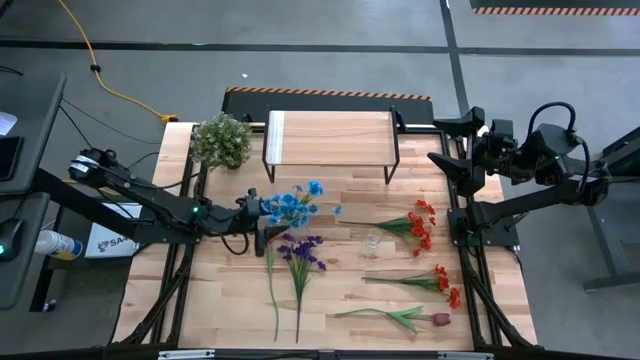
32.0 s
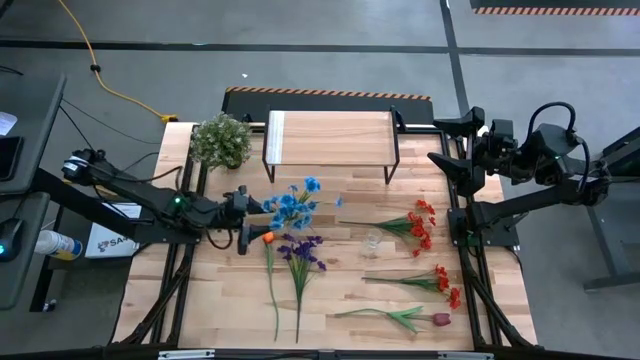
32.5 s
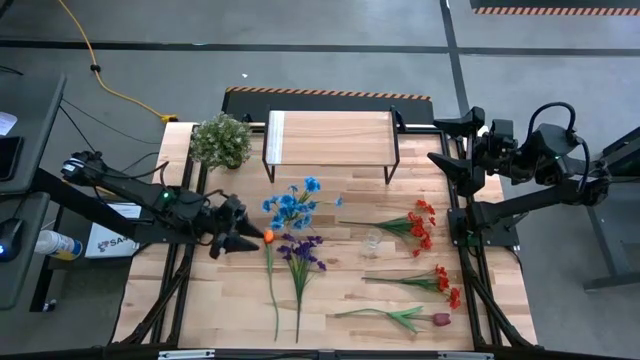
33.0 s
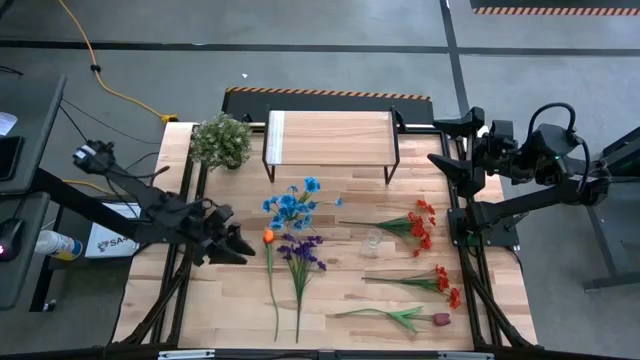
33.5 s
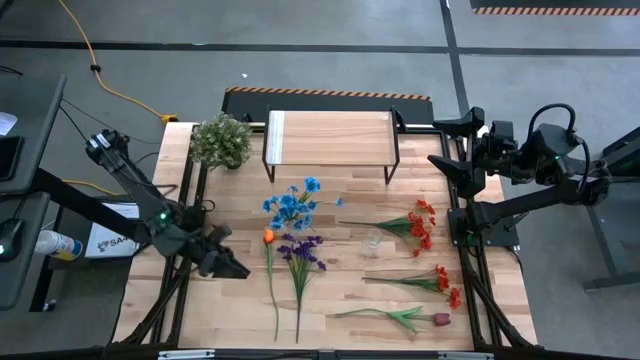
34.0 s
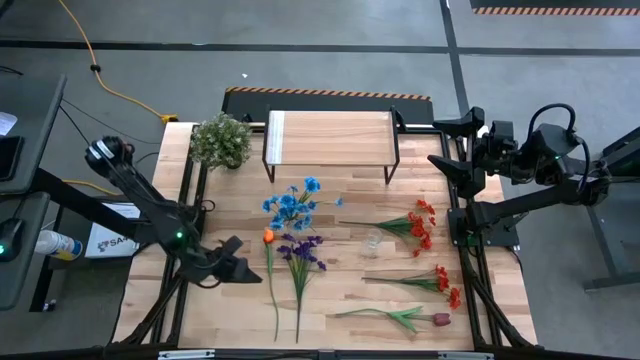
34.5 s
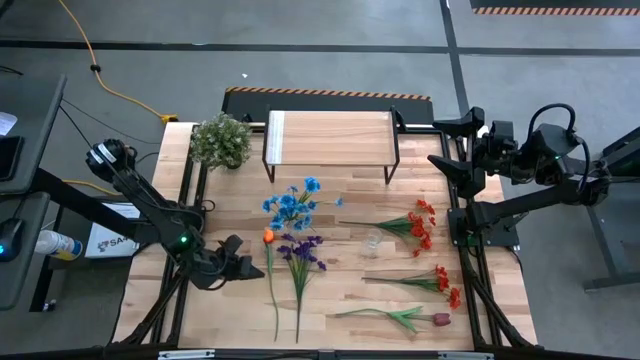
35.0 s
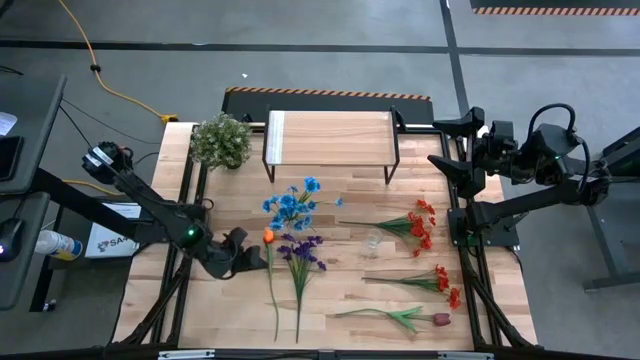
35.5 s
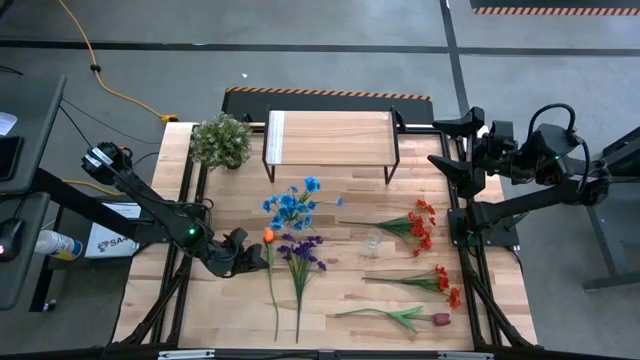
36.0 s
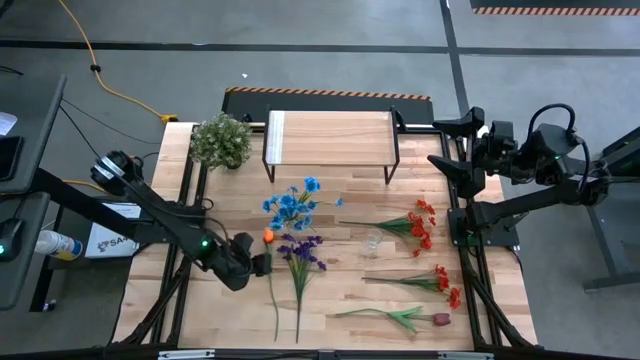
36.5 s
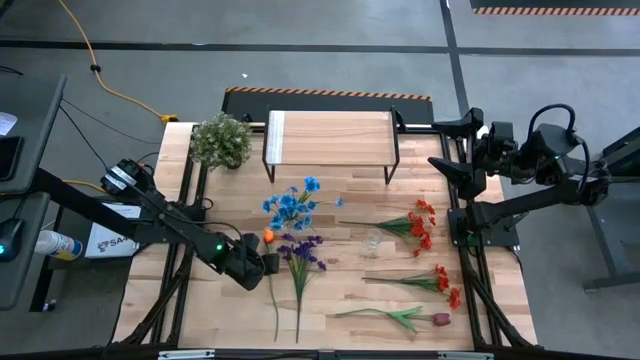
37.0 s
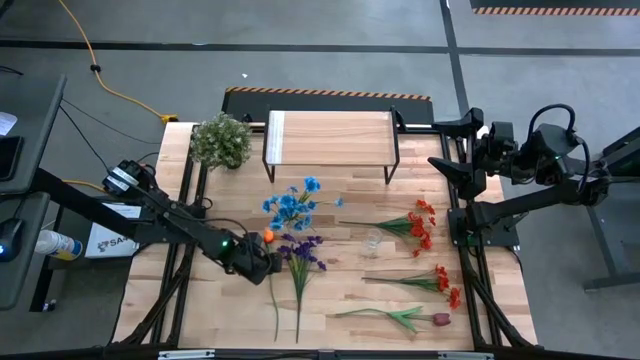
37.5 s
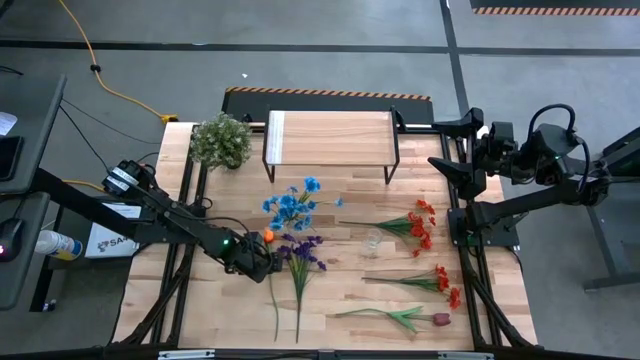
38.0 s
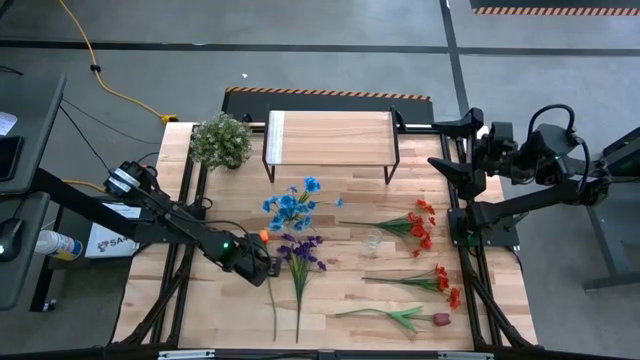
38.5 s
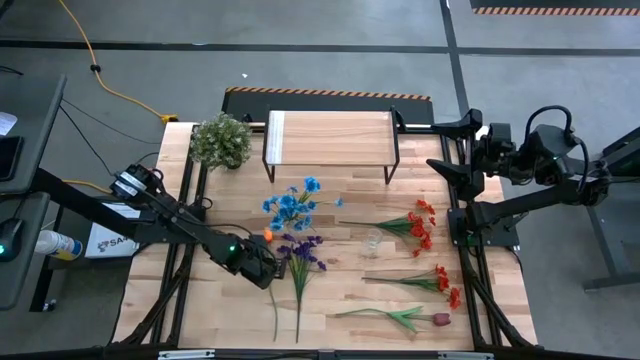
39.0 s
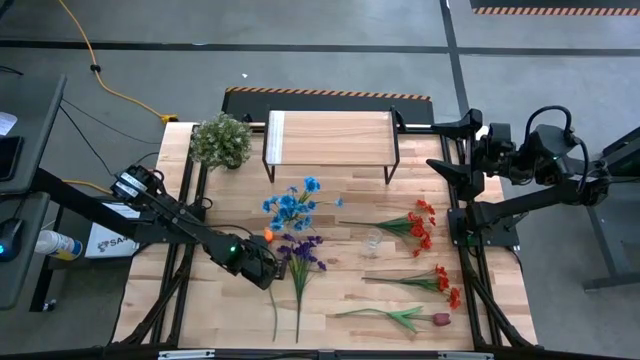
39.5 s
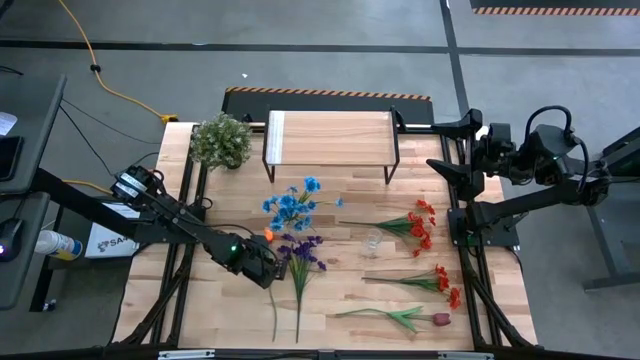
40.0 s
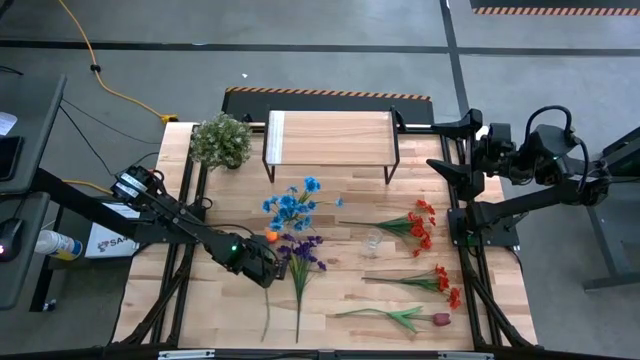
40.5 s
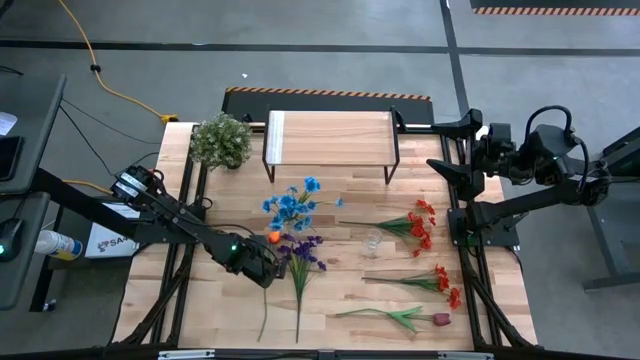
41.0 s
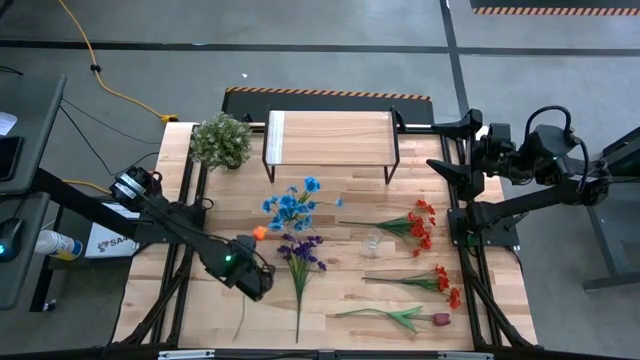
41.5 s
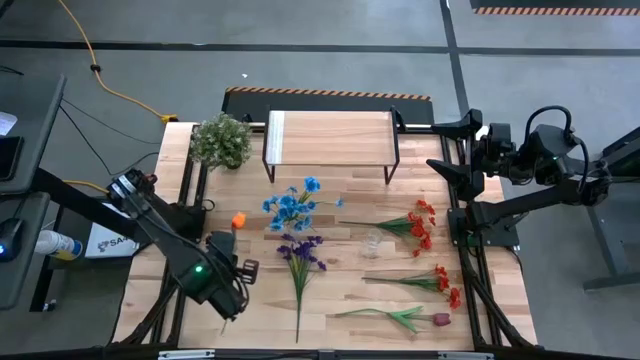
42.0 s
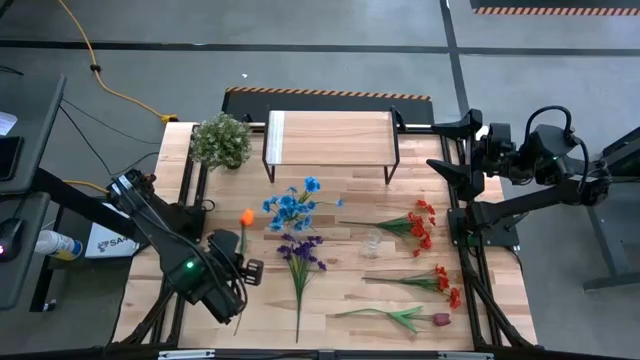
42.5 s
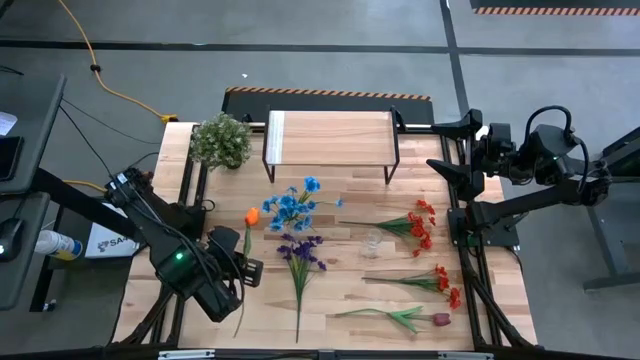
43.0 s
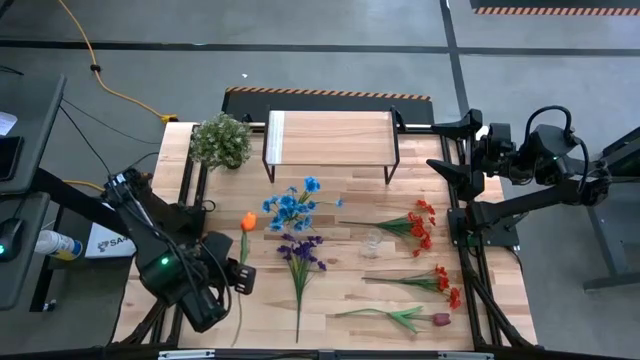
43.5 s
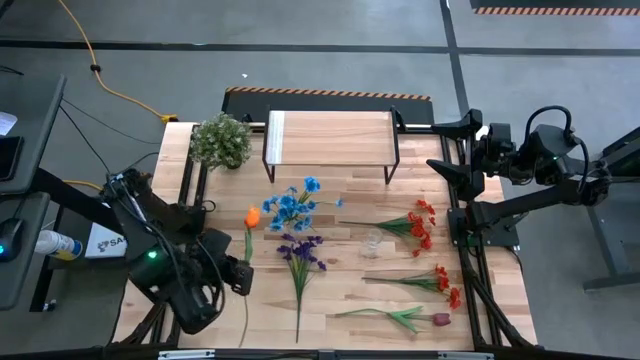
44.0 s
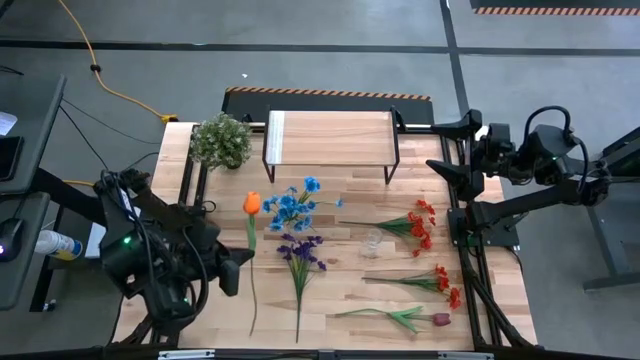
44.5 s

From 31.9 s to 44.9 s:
Task: Pick and place flowers into a vace then onto a shelf
Put the orange flower into the left transparent vase

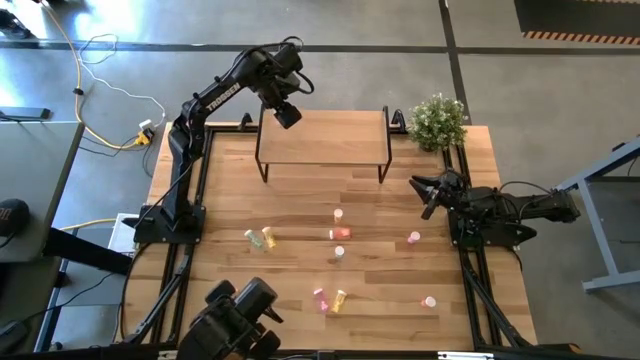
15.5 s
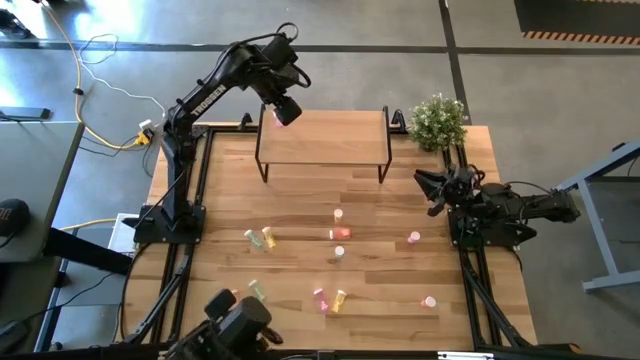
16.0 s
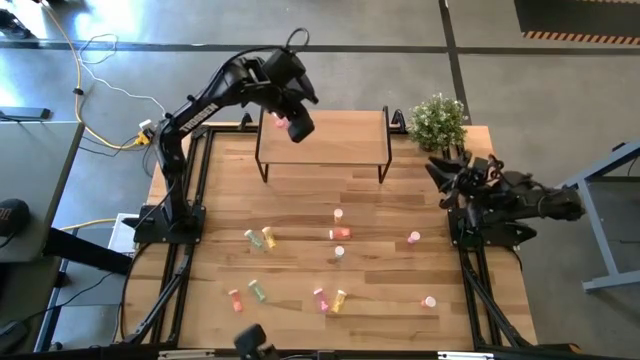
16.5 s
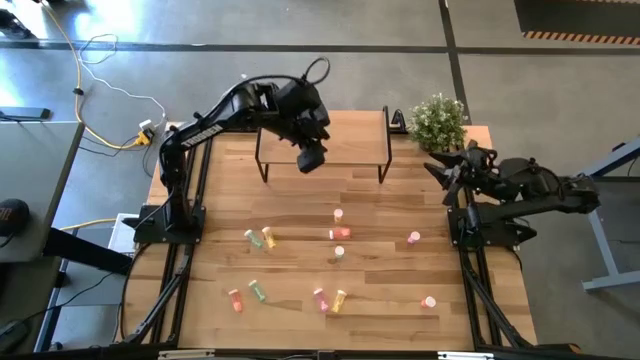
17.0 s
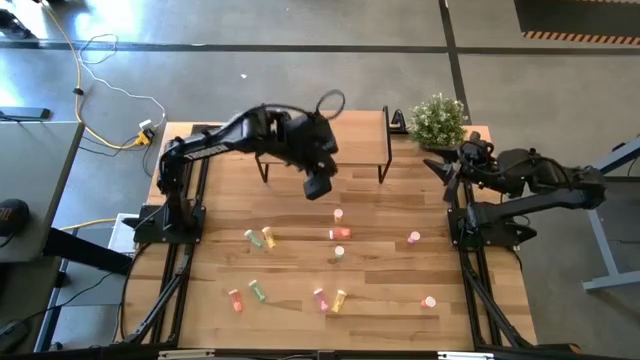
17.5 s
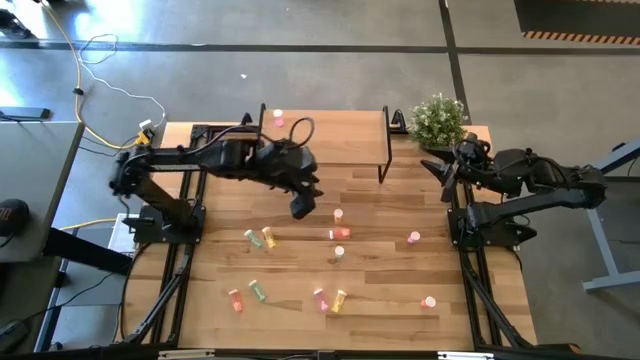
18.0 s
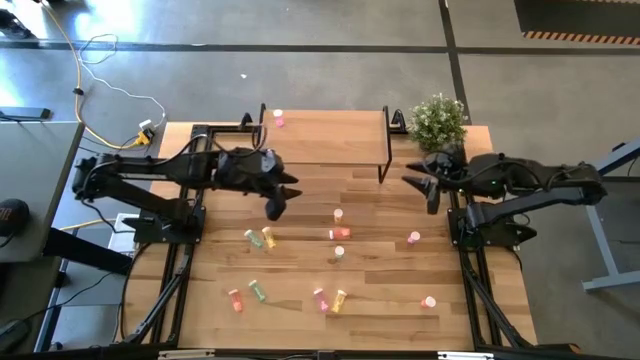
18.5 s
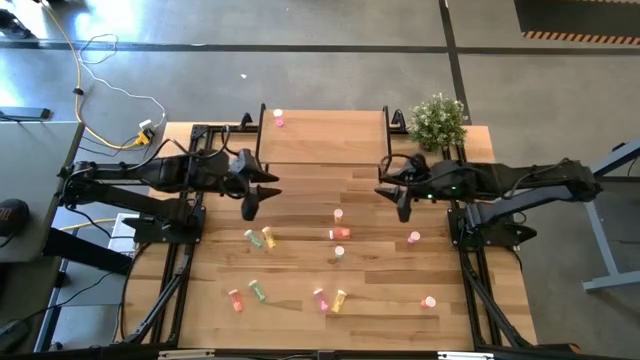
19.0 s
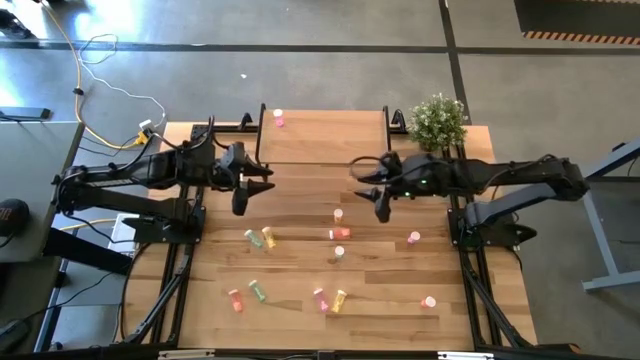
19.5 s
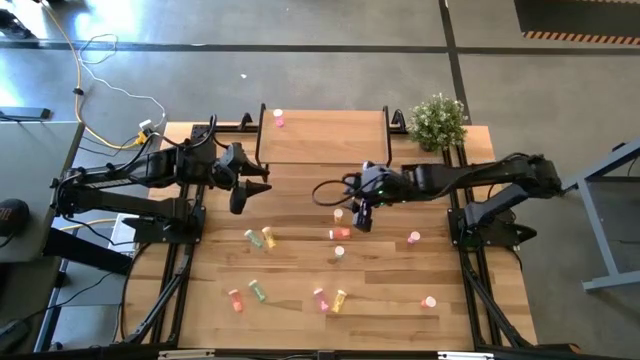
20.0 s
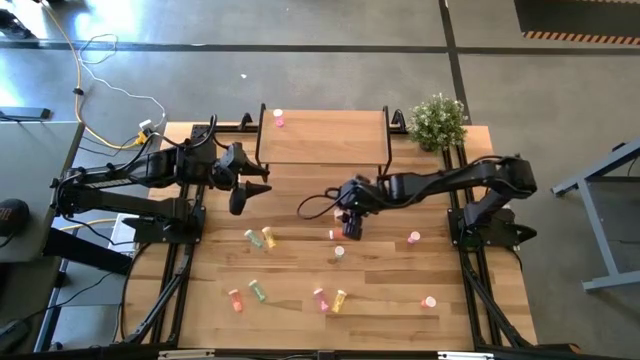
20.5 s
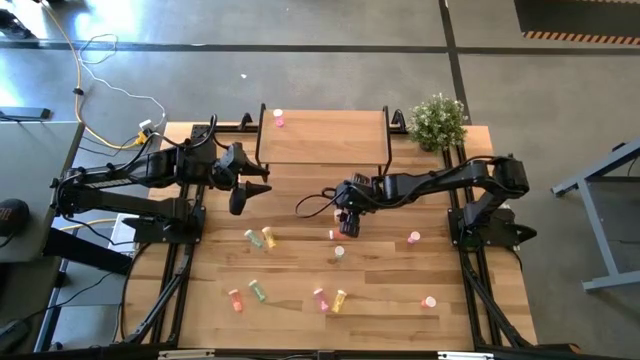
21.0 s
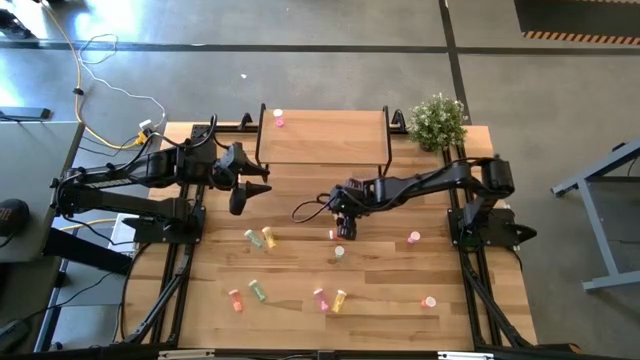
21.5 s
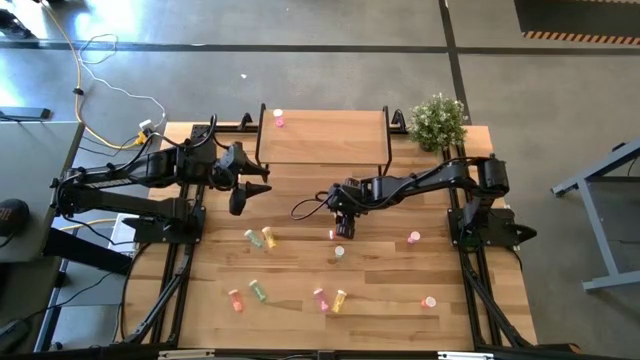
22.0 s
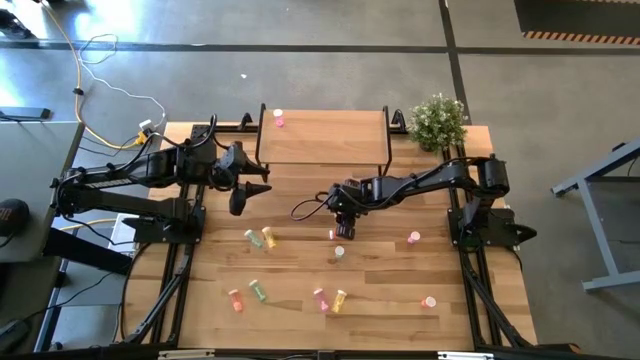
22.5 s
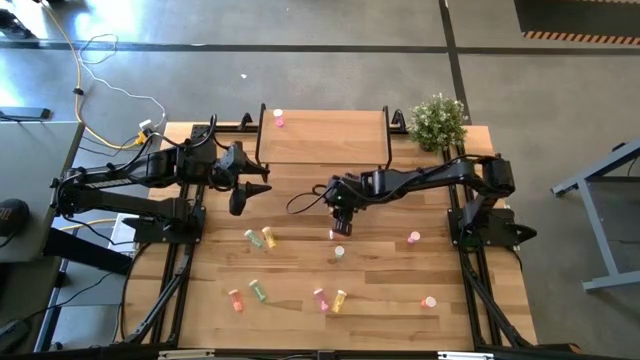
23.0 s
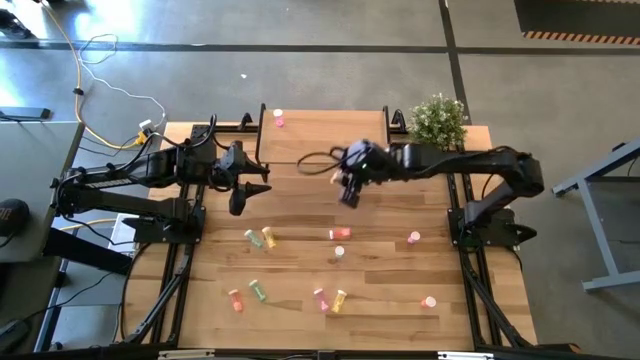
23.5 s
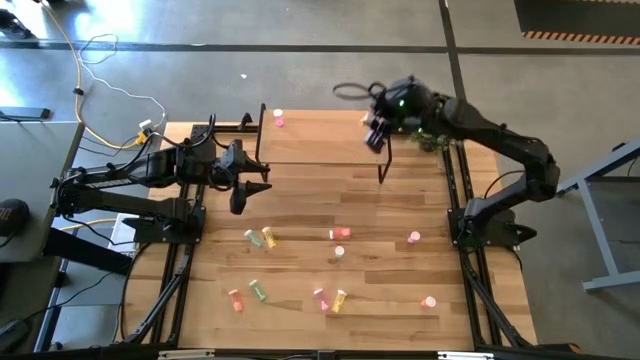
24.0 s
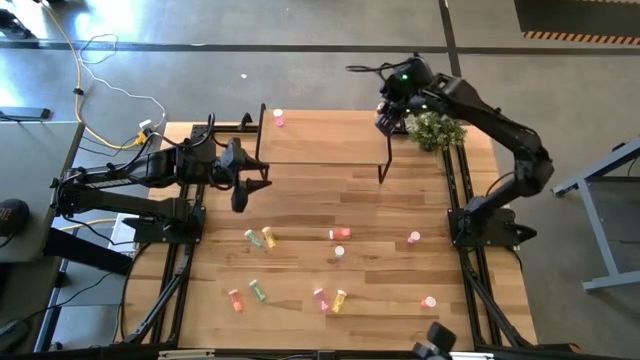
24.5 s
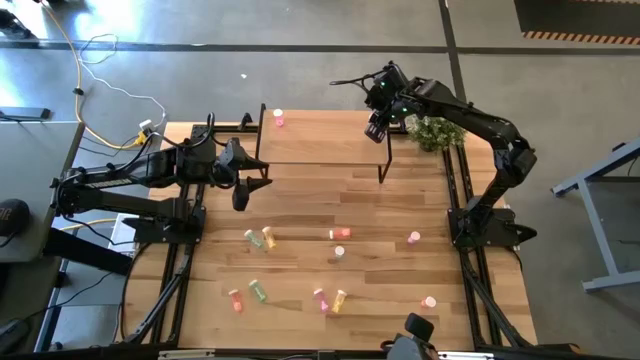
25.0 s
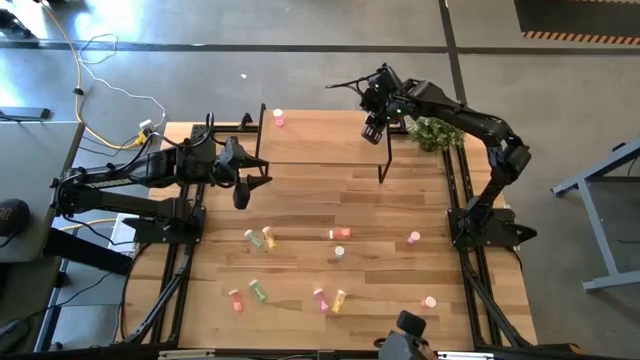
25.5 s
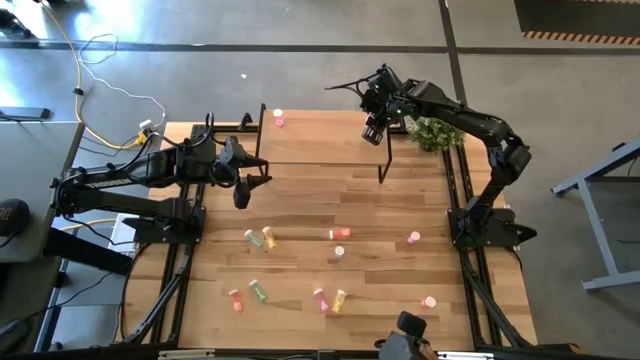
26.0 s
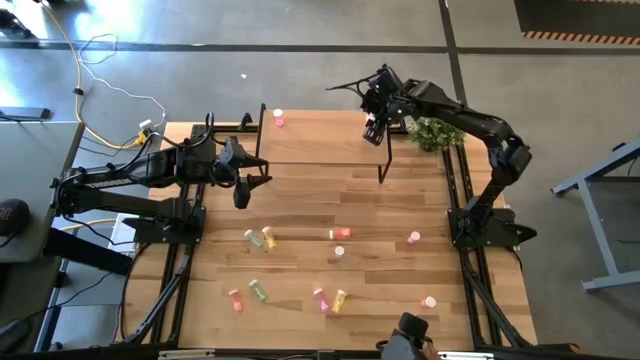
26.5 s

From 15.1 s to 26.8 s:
Task: Pick and place medicine bottles onto shelf by color
Put the top yellow pill bottle on the shelf
